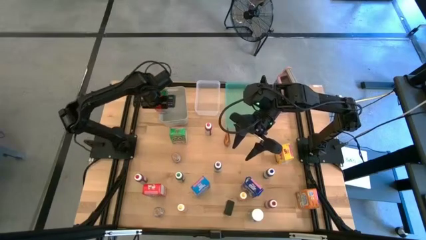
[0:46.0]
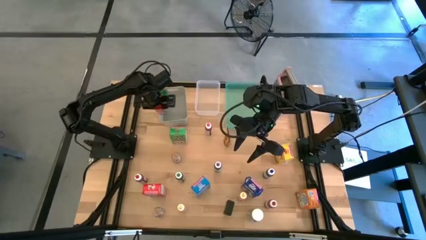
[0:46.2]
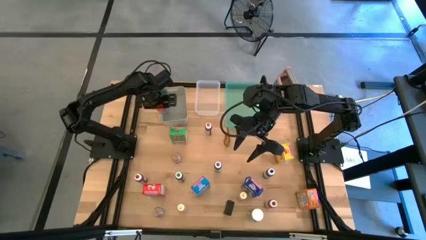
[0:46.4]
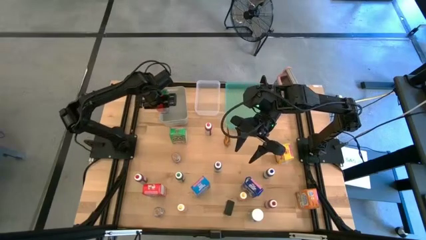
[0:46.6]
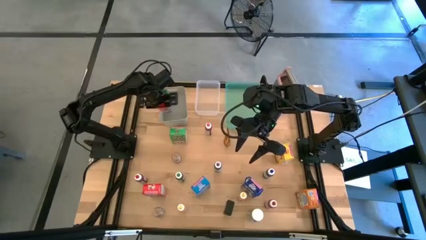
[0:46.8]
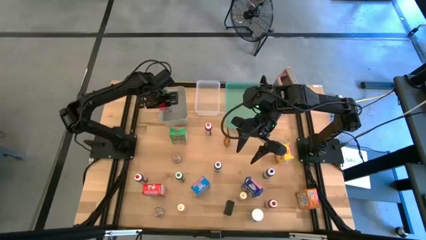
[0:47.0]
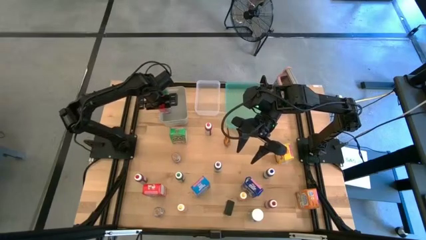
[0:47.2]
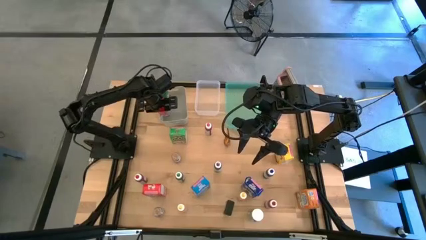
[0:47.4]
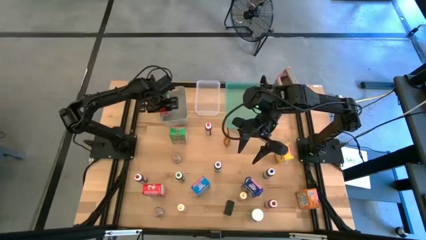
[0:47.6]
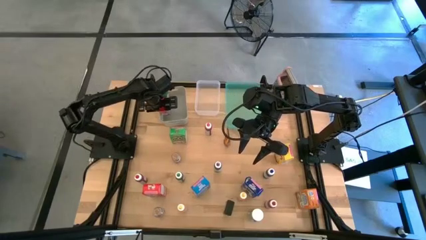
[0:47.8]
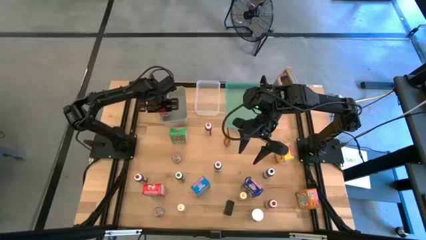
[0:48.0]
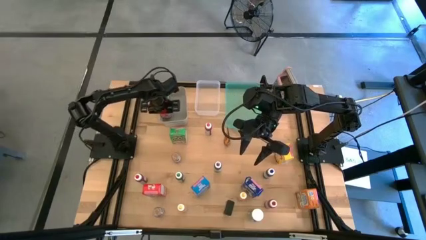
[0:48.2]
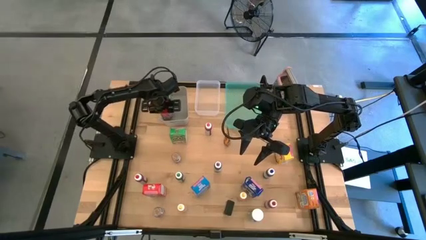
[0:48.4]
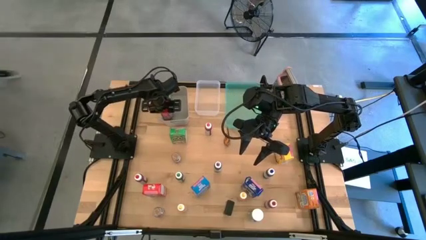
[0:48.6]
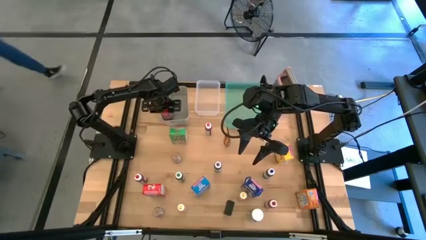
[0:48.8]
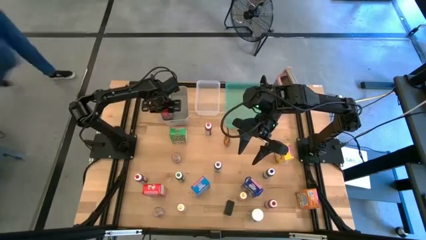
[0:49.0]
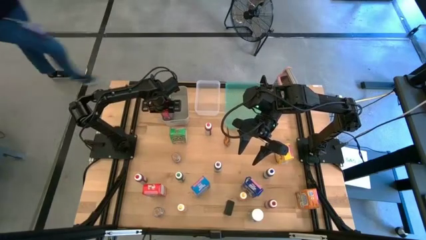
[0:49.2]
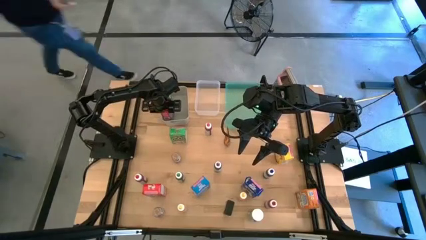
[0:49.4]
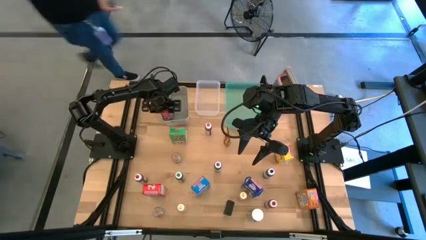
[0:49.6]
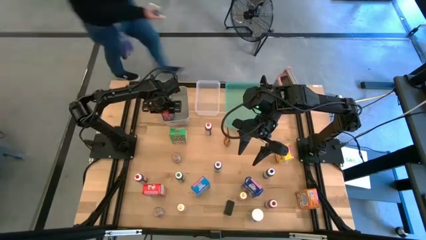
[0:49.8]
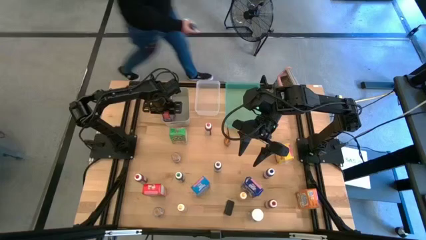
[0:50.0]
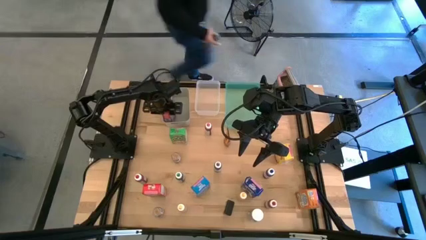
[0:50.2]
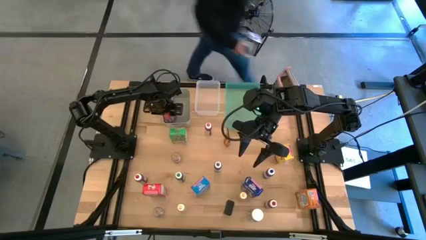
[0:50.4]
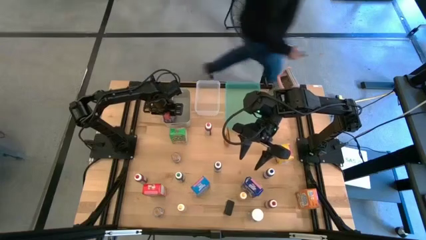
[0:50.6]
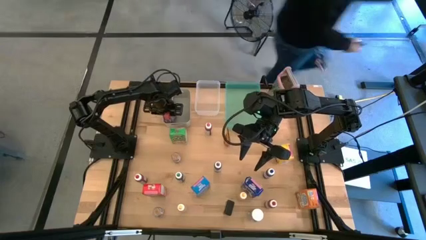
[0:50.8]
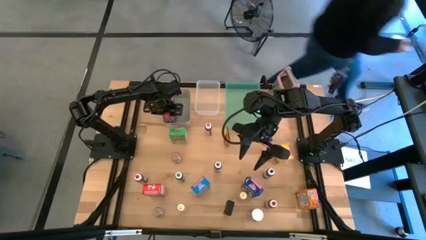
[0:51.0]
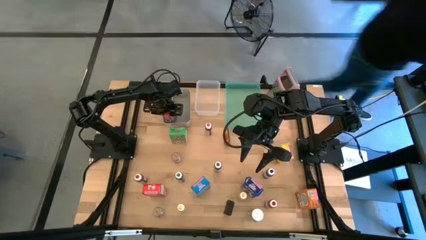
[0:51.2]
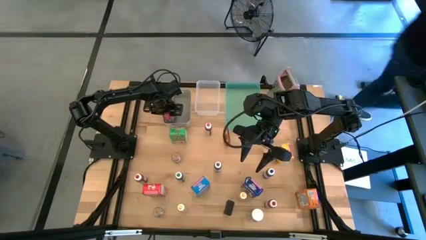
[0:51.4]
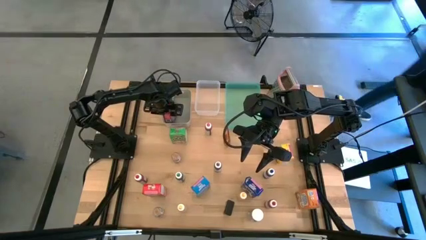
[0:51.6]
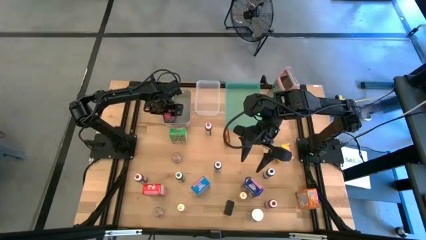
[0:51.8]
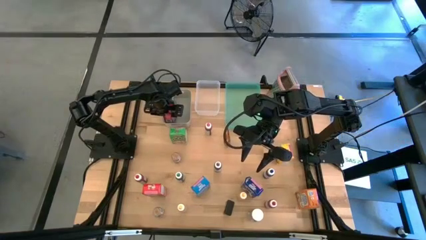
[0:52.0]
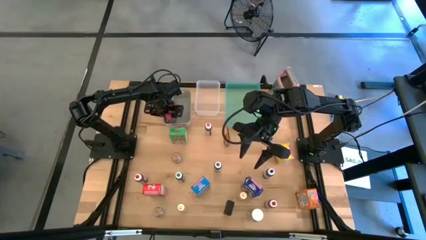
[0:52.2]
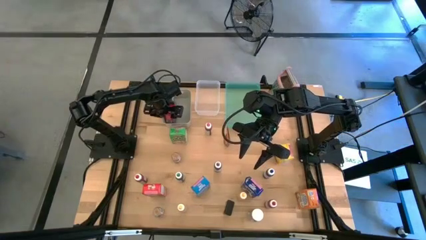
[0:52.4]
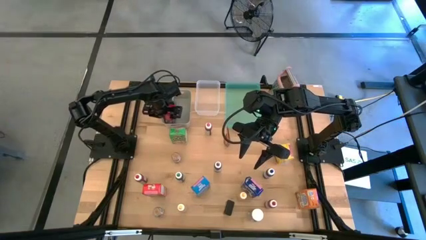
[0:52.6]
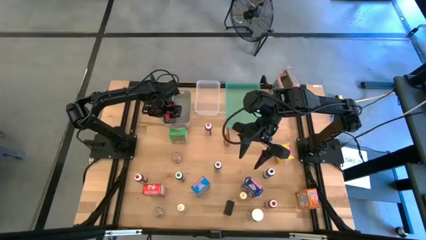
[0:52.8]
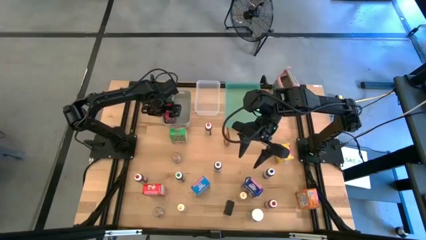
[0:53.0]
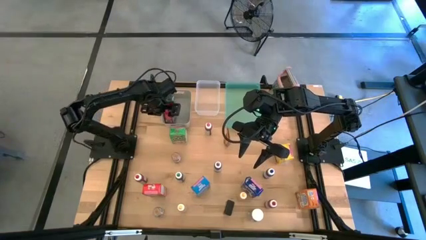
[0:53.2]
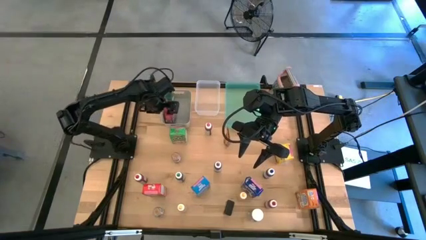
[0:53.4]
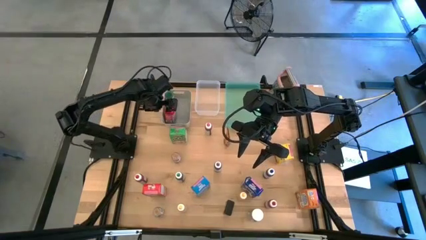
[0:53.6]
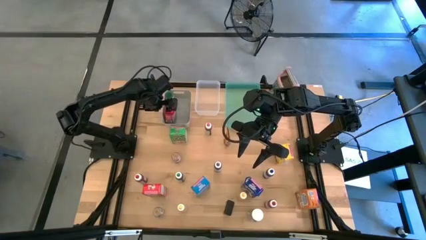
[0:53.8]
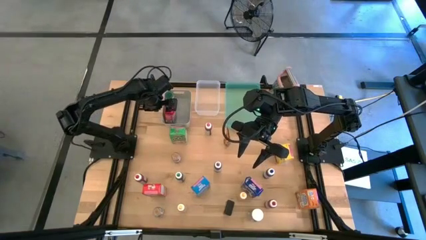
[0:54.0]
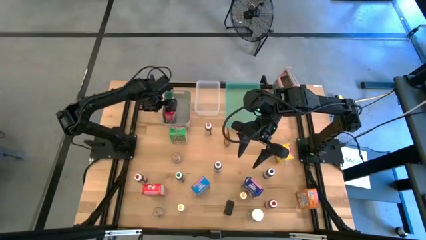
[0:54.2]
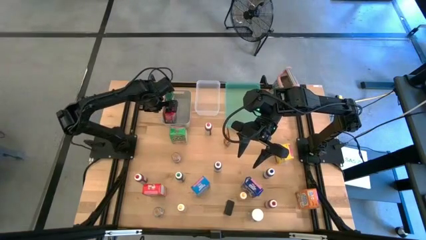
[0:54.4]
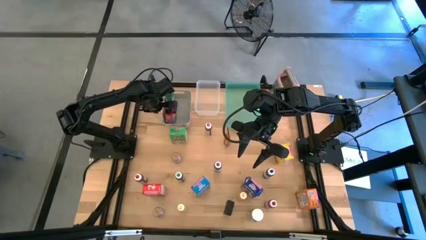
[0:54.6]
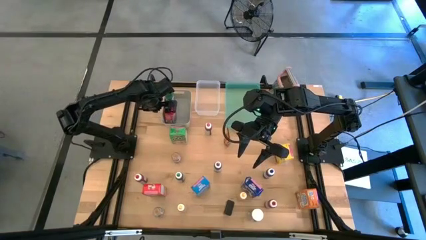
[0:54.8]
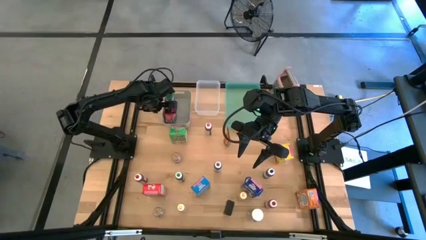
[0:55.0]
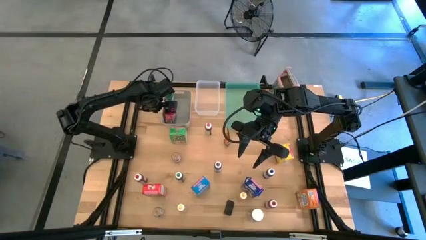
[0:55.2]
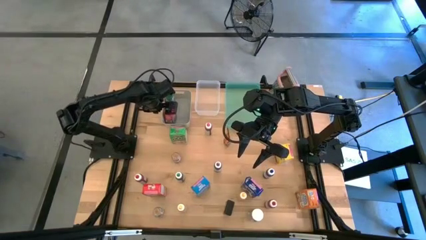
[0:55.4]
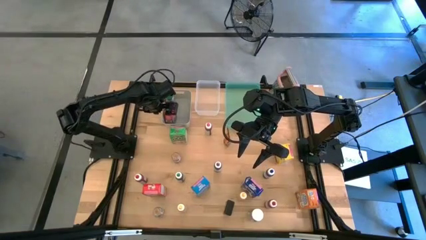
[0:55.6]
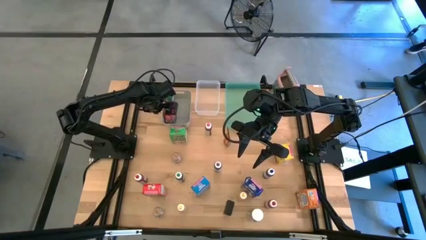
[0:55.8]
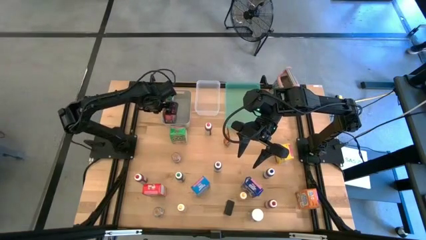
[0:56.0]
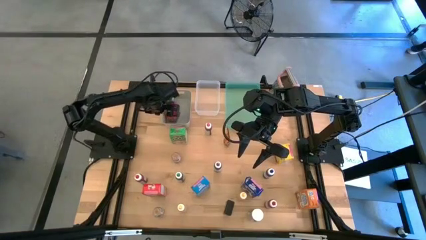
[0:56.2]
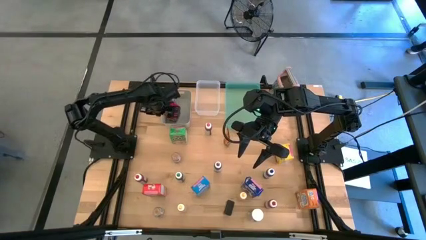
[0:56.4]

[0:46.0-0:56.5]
Task: Pick & Place Kitchen Items
Put the red seasoning can into the gray bin

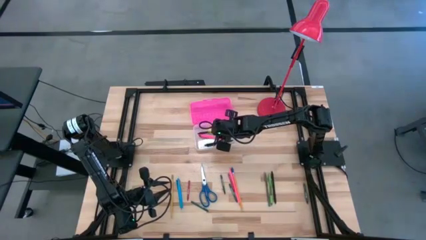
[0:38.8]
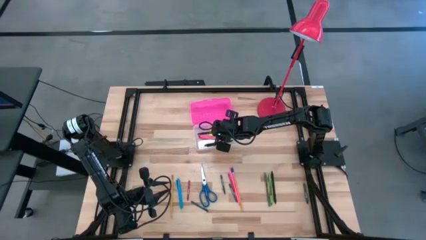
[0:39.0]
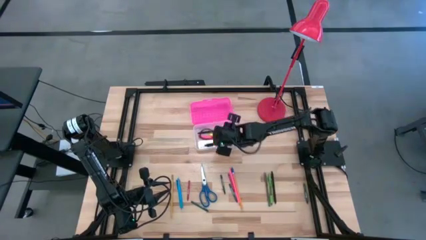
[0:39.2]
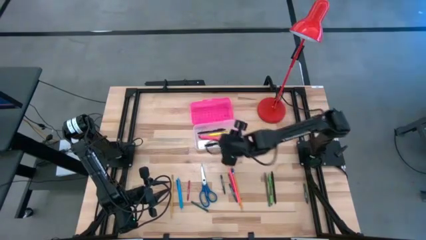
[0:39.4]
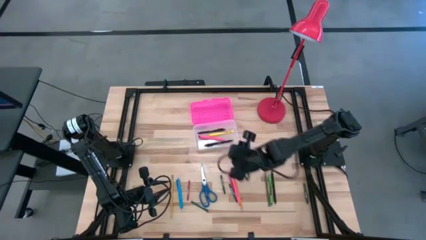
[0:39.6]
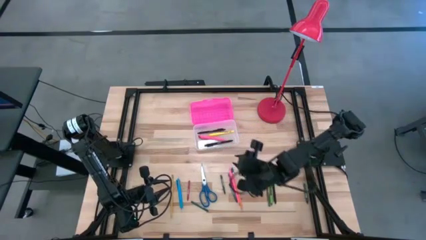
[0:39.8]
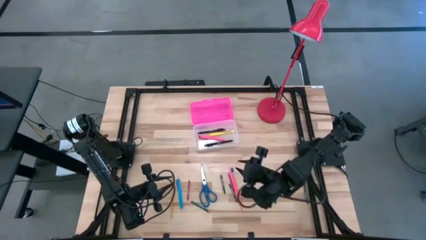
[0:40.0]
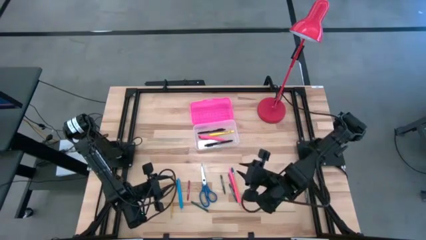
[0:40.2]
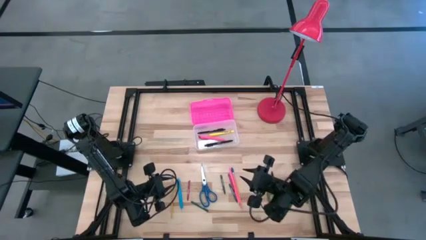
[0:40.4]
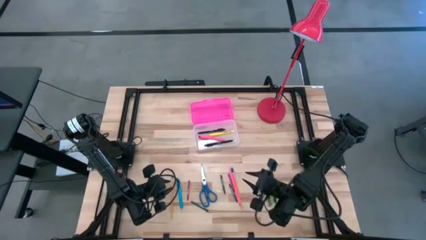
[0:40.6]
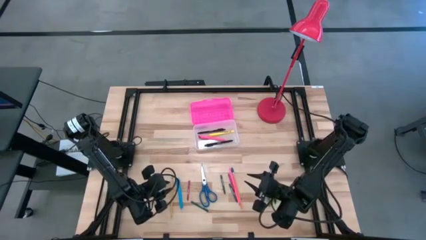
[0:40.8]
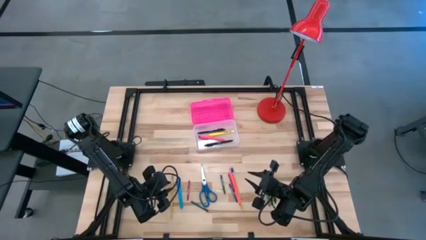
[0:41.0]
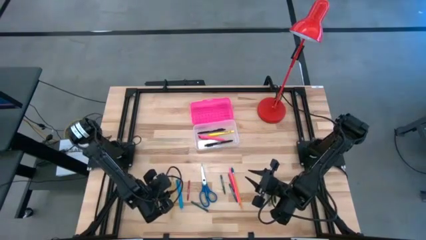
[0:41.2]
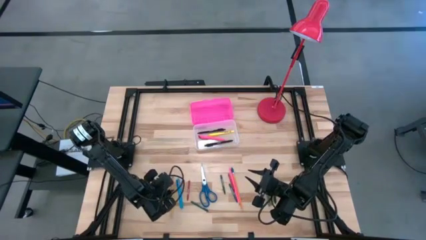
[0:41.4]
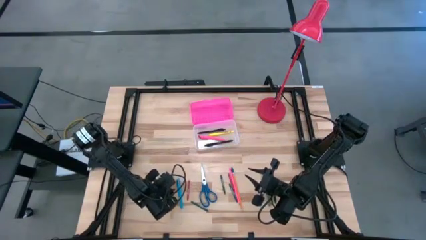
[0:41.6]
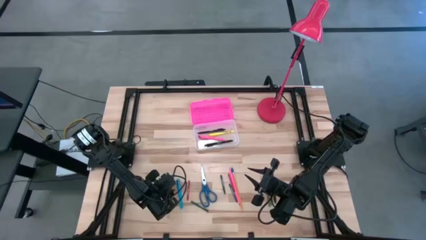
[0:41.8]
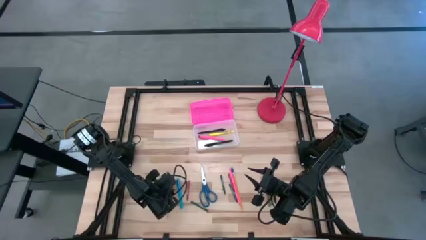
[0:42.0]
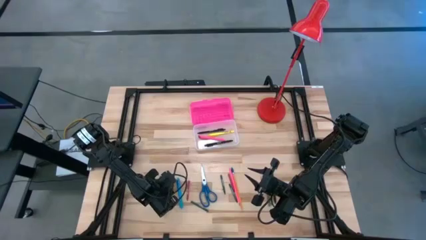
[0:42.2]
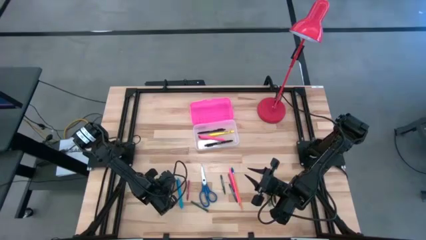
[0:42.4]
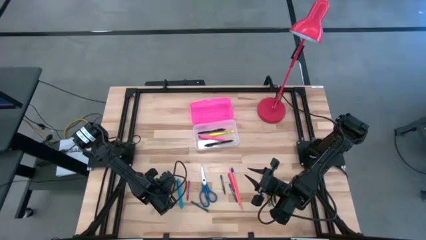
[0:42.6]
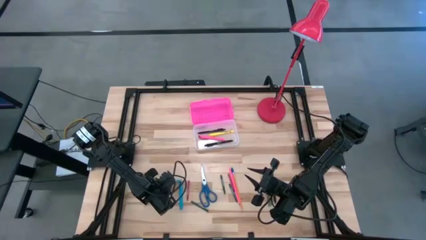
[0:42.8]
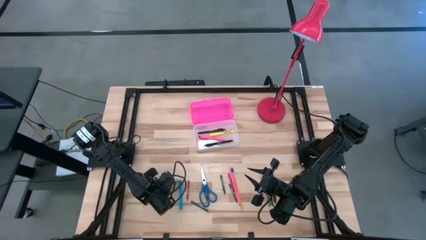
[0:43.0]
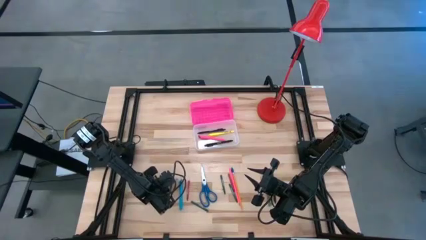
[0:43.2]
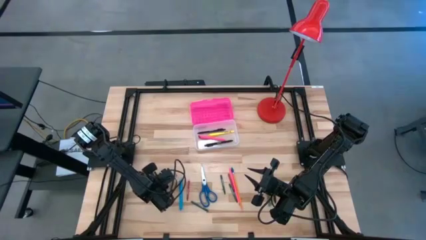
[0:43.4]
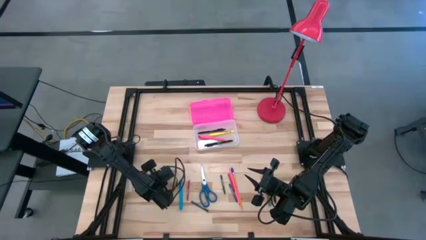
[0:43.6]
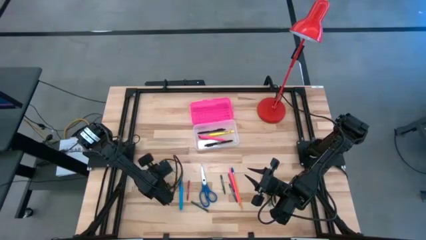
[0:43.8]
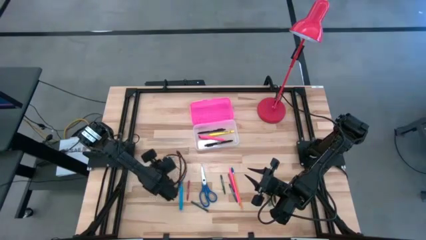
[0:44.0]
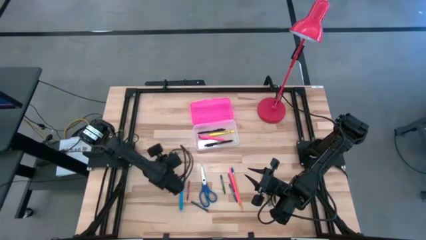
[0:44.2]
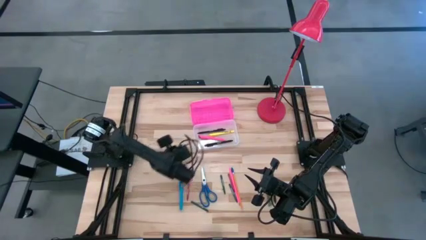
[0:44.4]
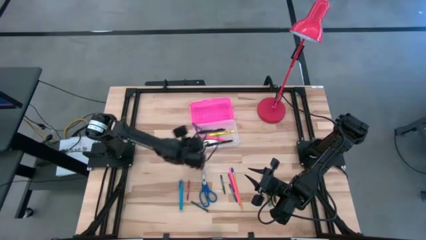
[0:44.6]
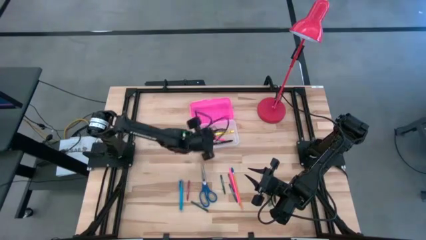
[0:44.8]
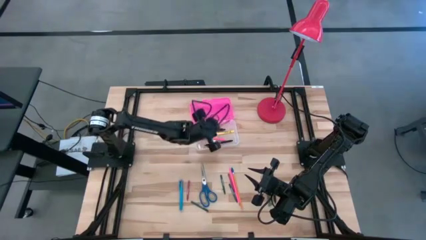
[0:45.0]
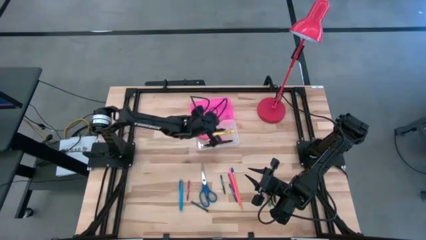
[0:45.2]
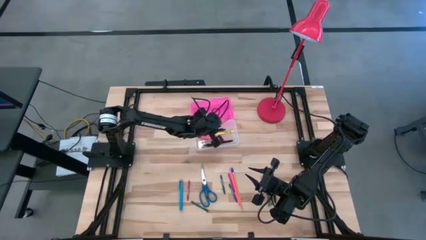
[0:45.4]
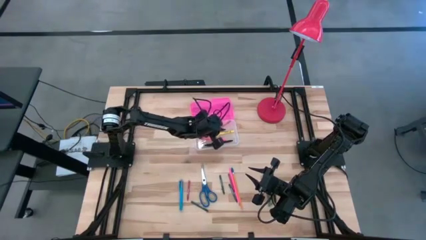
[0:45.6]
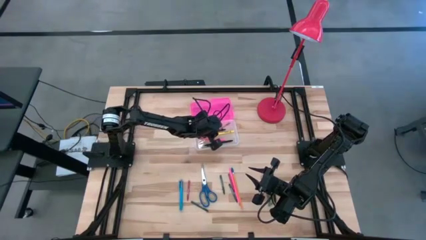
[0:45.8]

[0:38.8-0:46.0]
Task: Pick & place school supplies into a supply box
Put the yellow pencil into the pink supply box
